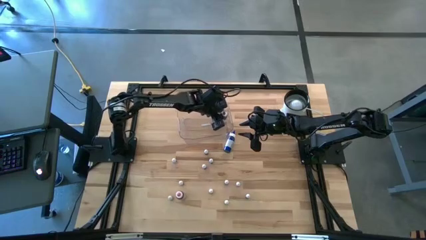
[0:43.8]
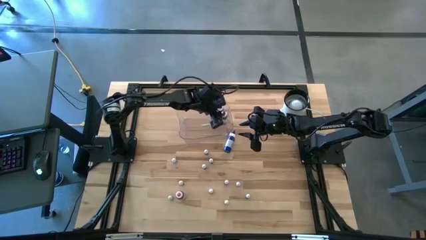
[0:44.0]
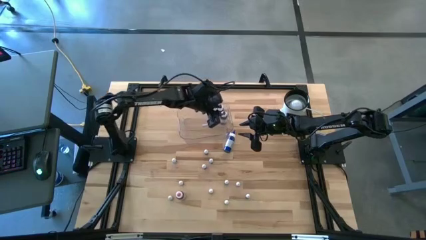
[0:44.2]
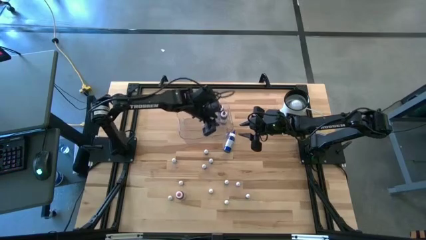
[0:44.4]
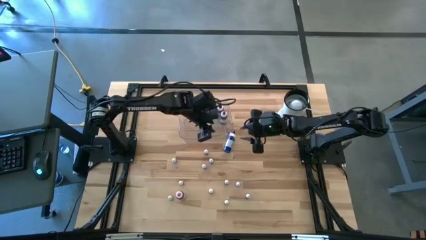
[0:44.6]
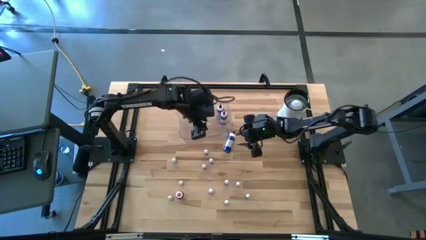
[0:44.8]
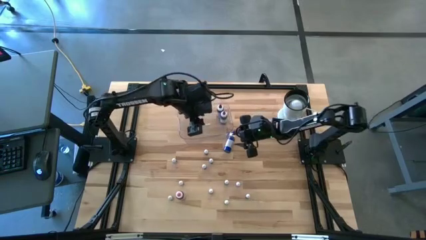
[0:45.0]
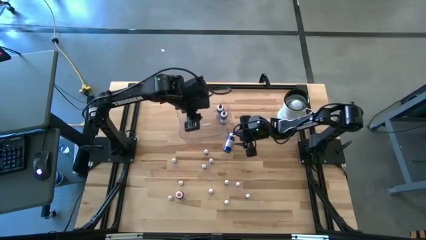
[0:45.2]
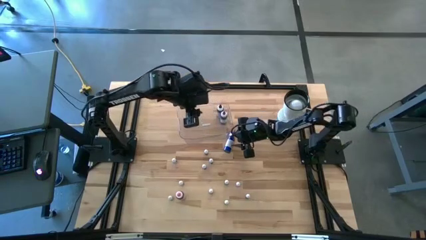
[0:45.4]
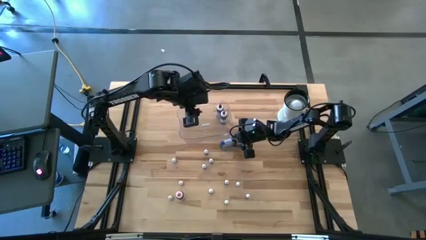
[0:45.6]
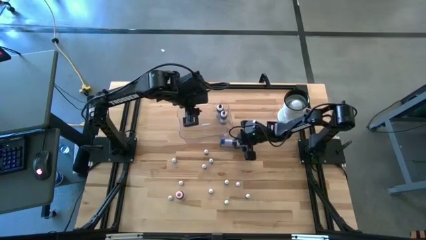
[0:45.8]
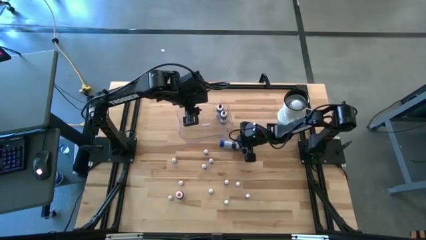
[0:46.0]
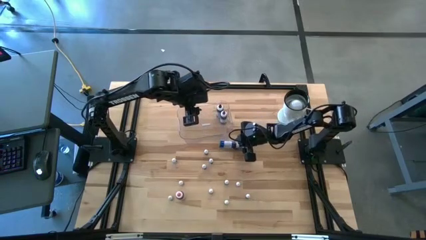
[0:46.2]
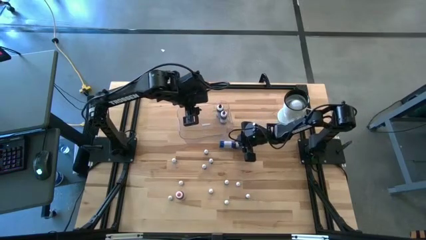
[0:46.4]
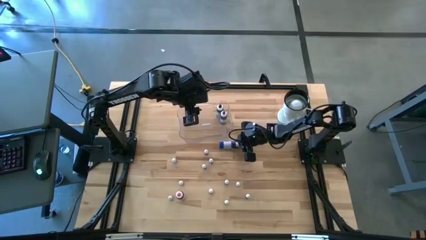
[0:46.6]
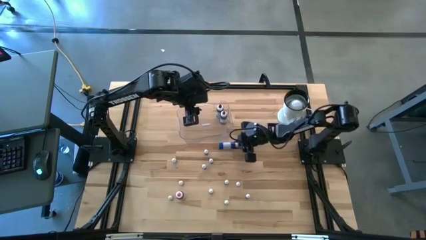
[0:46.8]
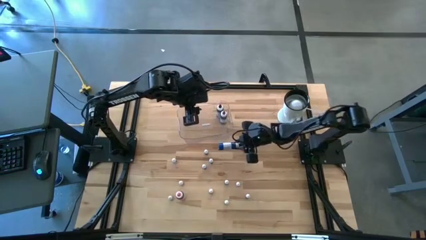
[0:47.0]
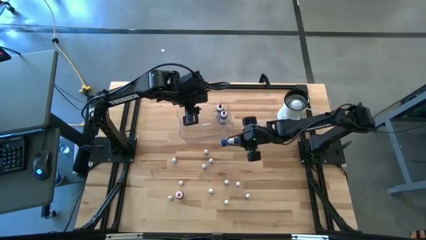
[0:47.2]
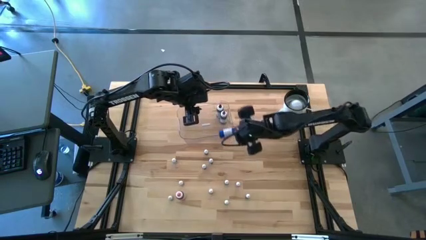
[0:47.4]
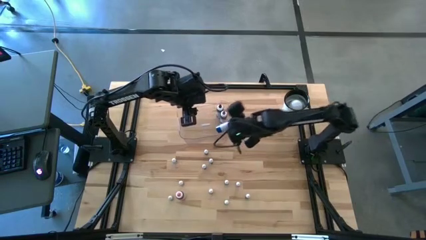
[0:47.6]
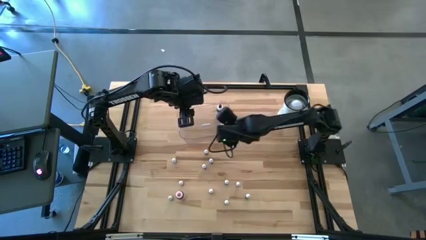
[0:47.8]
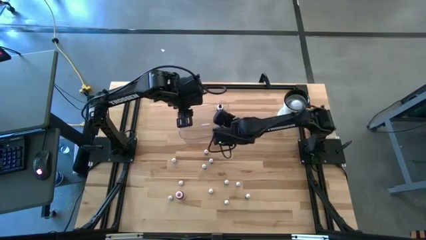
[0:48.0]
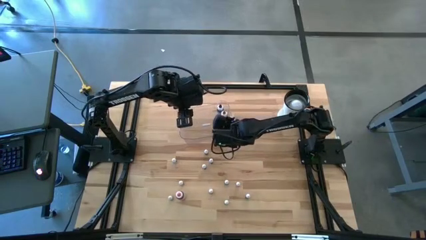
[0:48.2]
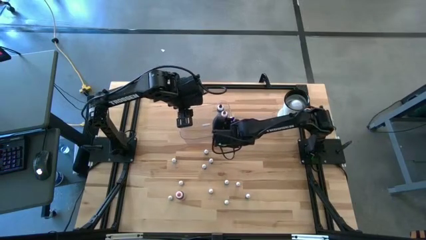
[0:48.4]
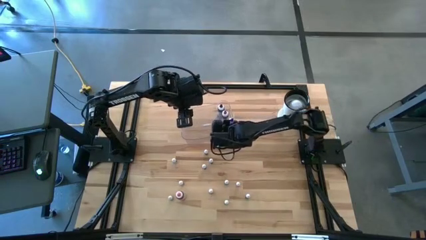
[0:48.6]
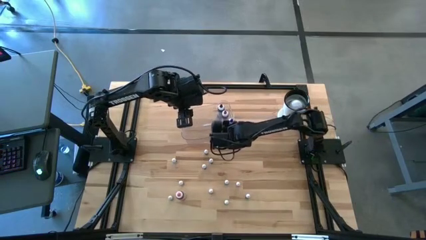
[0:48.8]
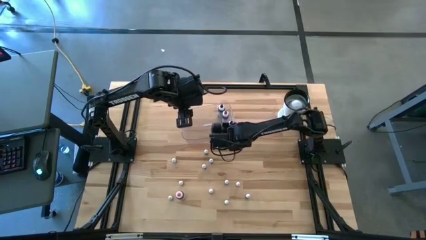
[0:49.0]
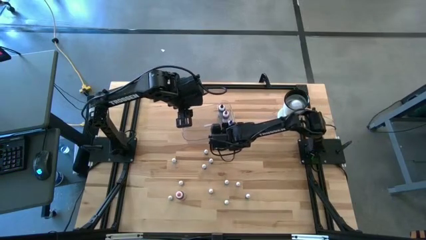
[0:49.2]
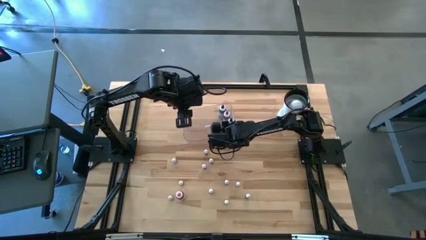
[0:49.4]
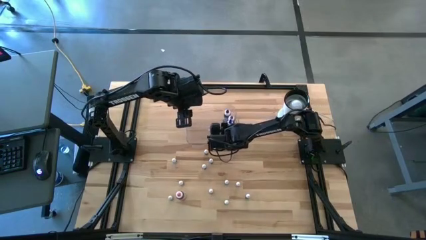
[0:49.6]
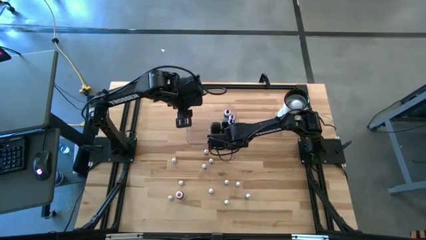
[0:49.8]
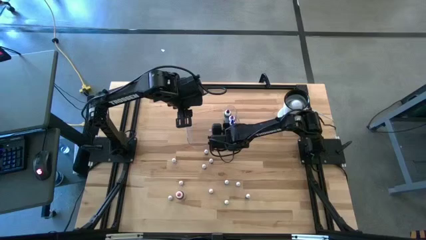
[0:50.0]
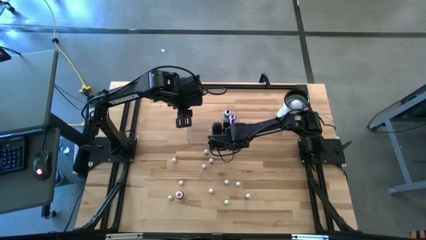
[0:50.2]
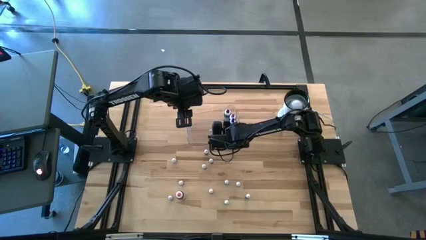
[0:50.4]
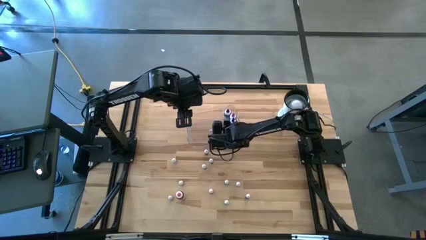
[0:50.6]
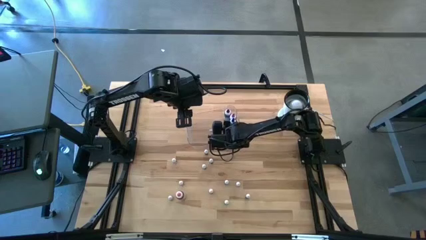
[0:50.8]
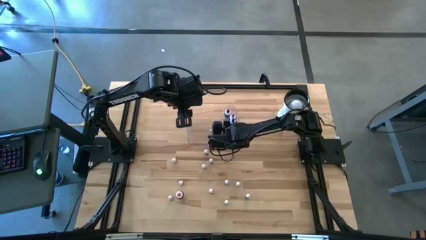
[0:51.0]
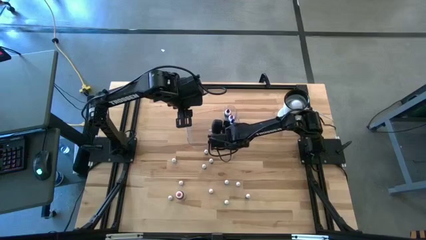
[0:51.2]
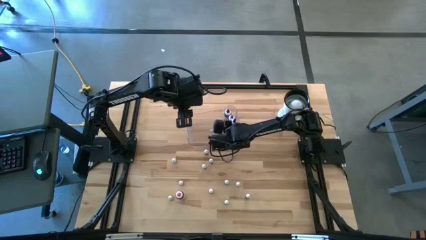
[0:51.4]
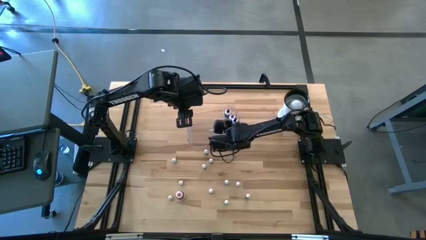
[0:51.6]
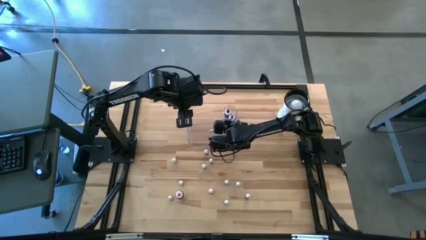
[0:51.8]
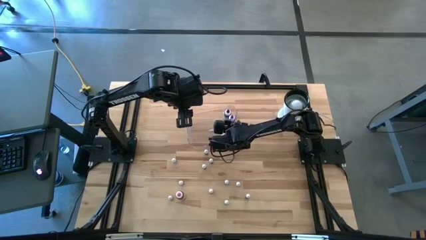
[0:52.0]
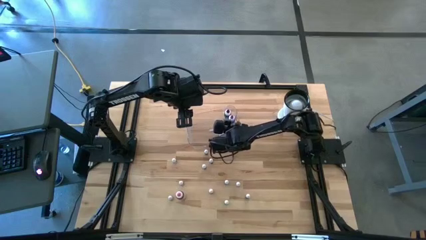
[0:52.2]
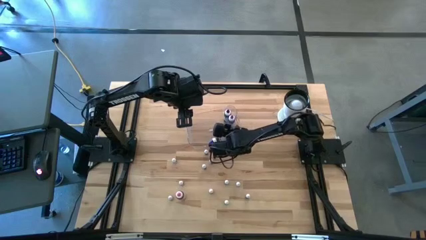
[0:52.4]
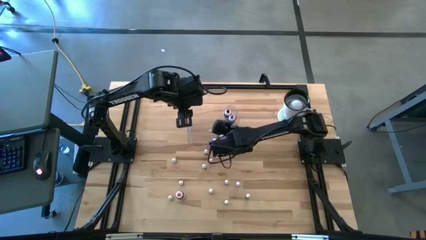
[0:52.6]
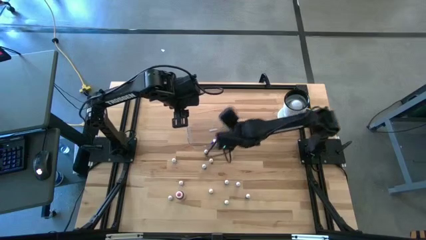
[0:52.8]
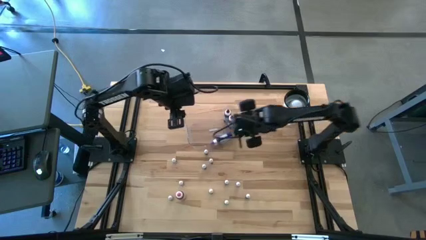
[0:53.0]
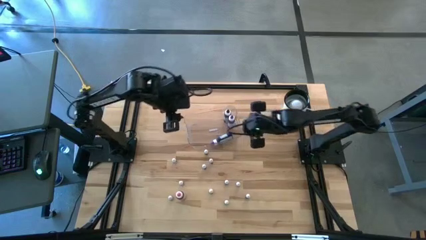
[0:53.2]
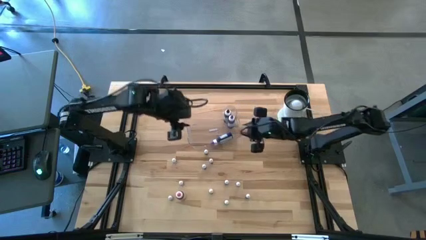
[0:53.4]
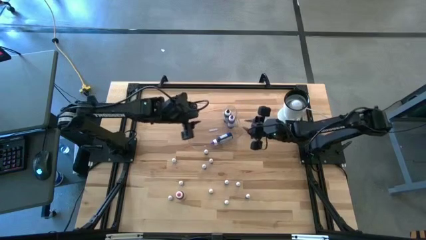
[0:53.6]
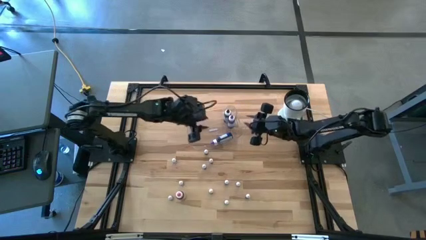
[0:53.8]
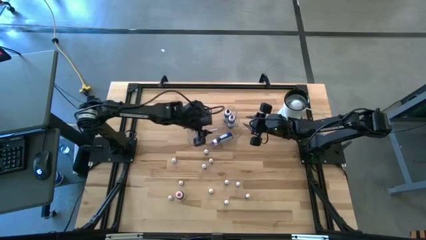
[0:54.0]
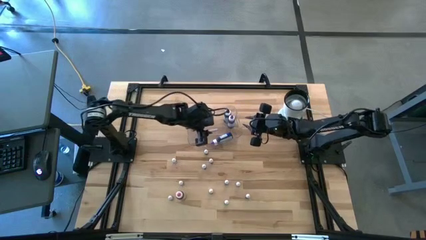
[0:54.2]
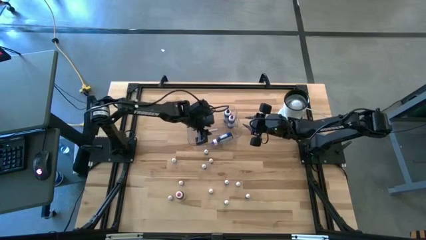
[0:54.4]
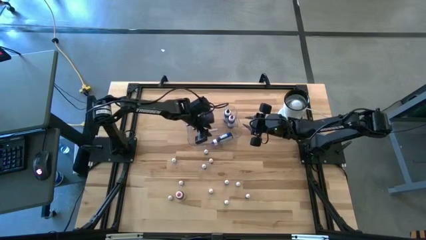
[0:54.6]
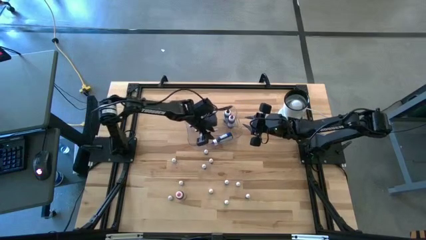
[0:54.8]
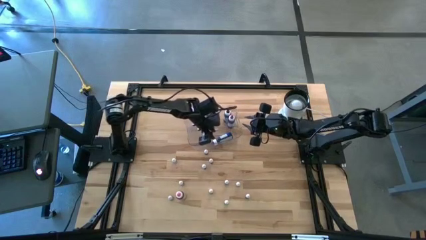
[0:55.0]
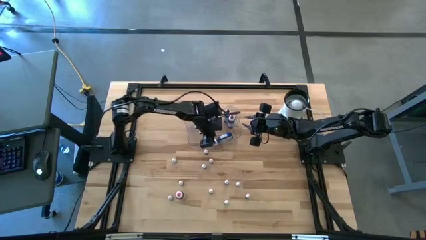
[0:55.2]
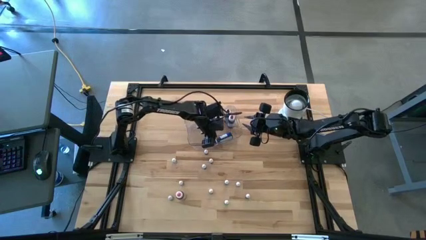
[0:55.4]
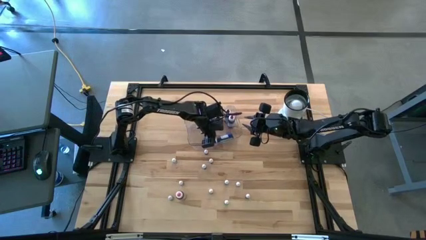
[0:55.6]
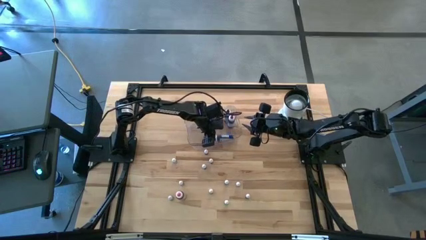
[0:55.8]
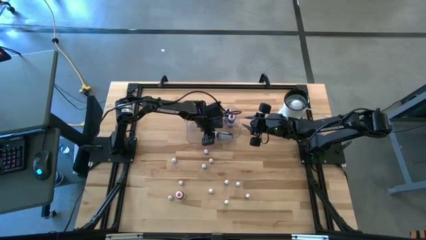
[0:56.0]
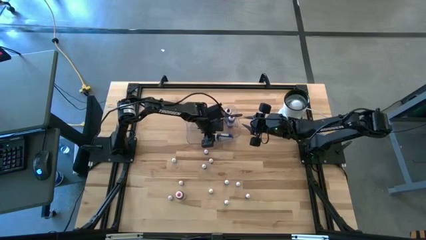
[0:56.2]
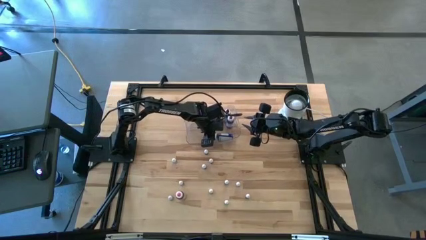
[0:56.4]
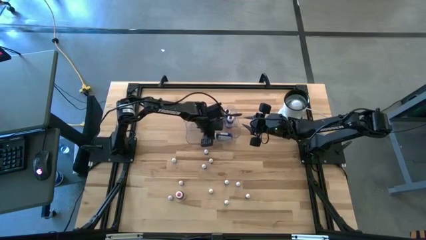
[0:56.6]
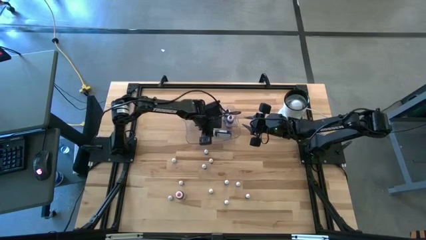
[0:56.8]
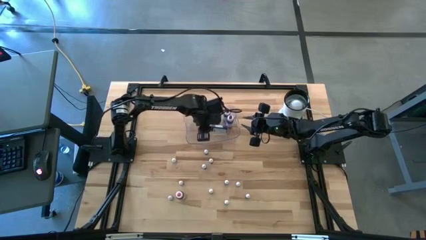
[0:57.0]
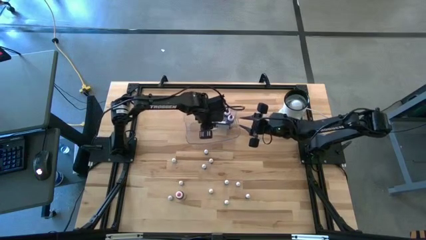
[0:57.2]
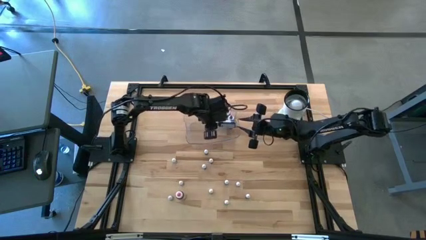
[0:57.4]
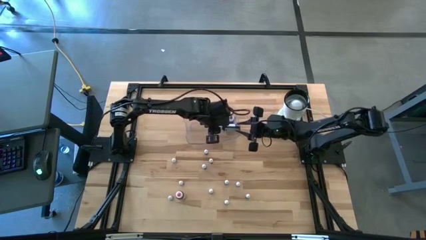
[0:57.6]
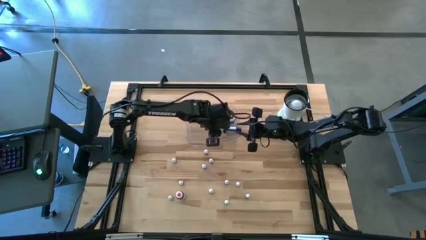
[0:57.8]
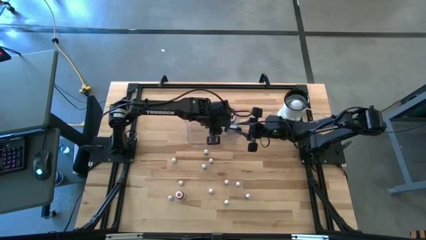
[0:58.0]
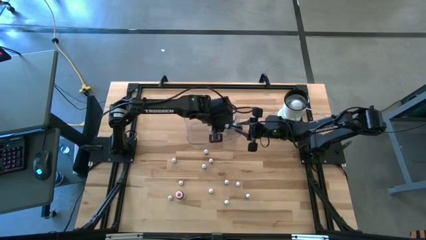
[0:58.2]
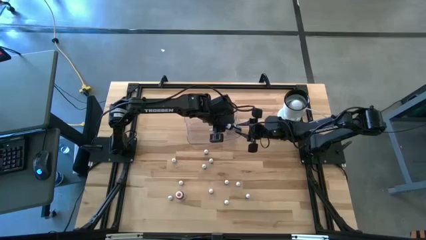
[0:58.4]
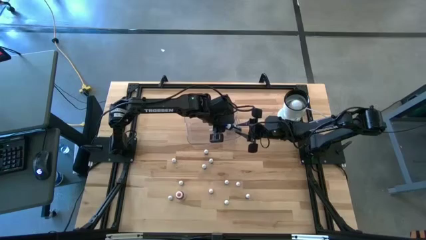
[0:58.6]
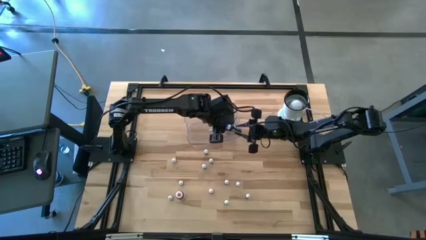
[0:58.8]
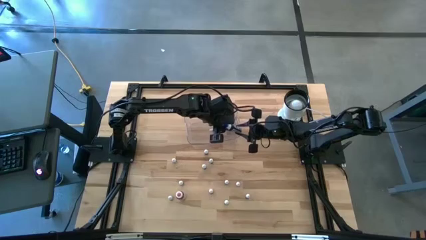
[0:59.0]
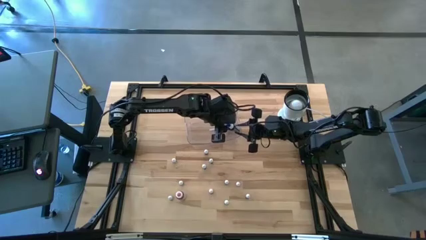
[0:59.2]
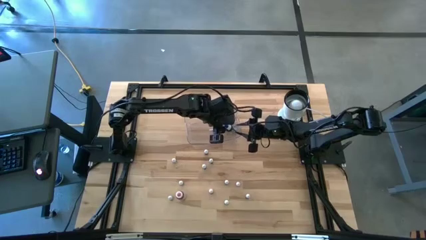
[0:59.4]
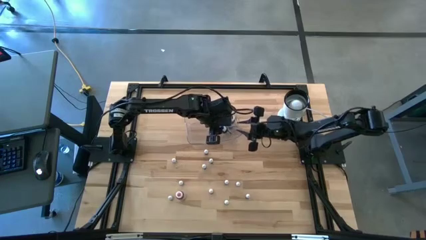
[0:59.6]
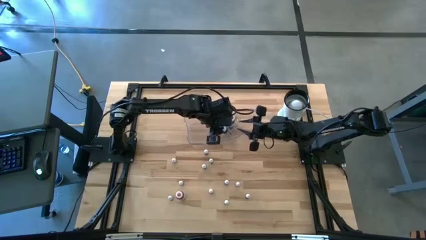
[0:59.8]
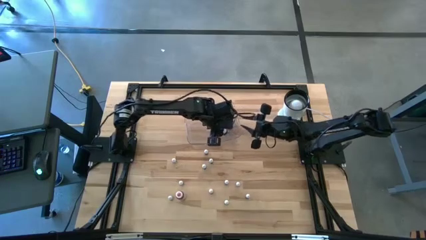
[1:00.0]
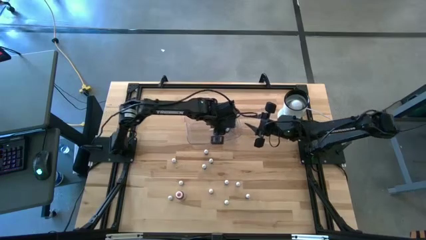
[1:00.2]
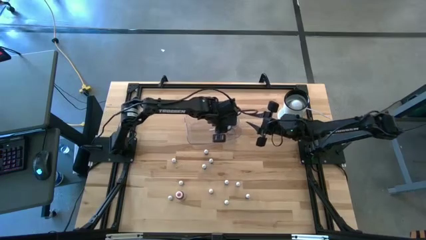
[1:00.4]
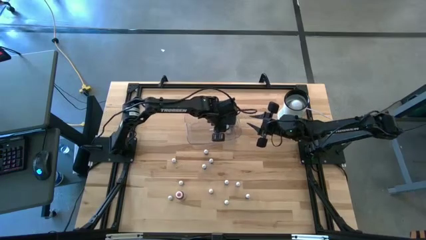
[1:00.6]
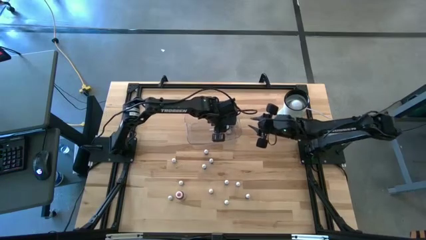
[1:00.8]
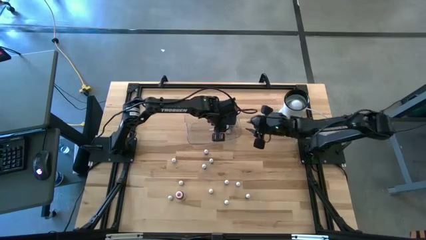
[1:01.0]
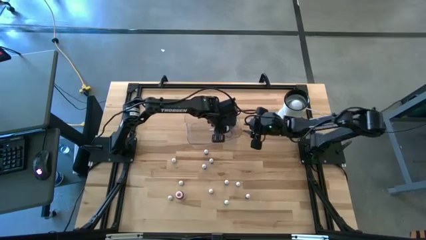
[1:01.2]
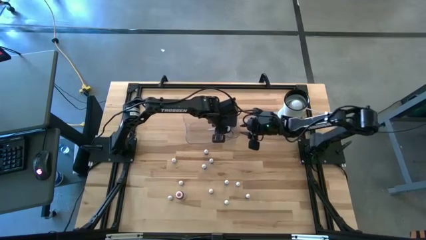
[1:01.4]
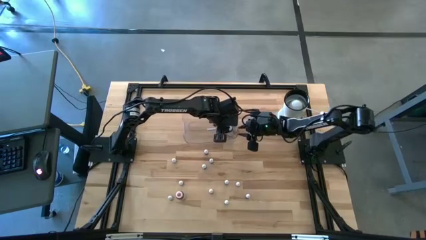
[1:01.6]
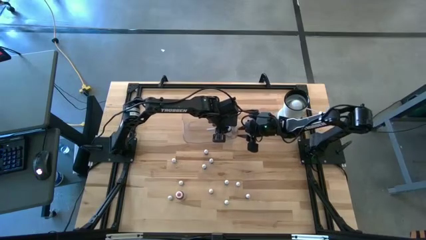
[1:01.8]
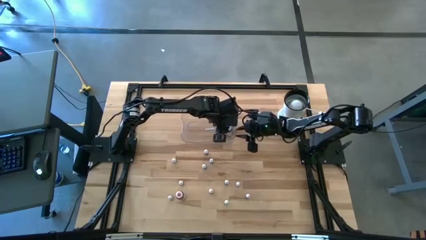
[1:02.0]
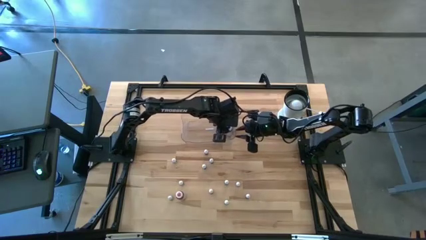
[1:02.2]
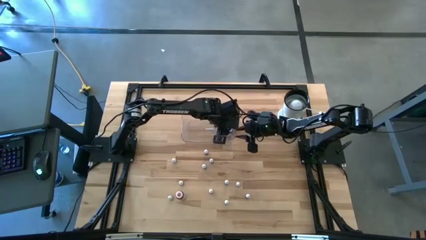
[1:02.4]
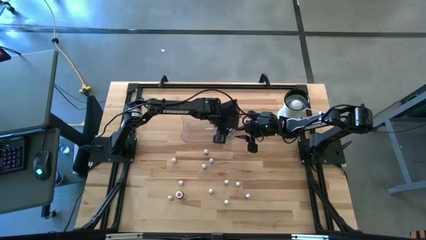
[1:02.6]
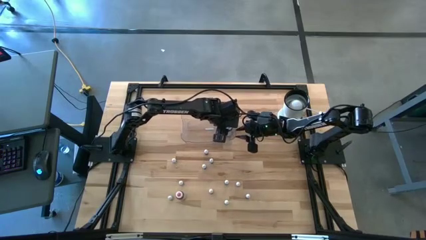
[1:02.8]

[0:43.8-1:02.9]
Task: Pick & Place food coloring
Put the large blue food coloring bottle into the transparent bin
